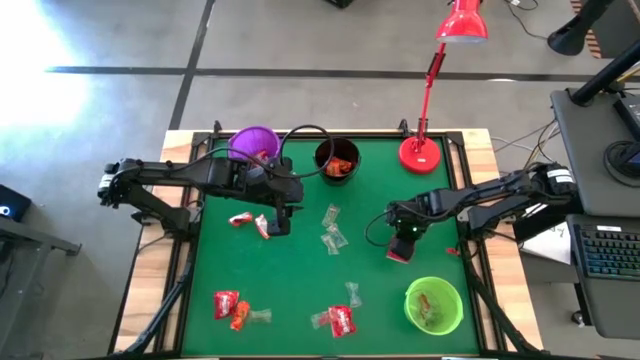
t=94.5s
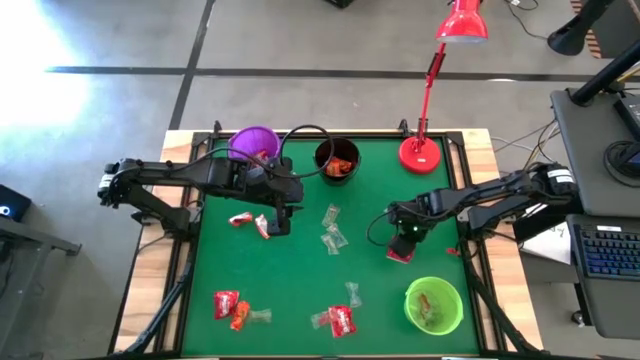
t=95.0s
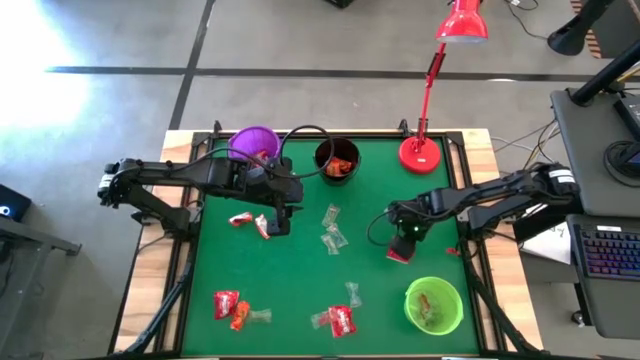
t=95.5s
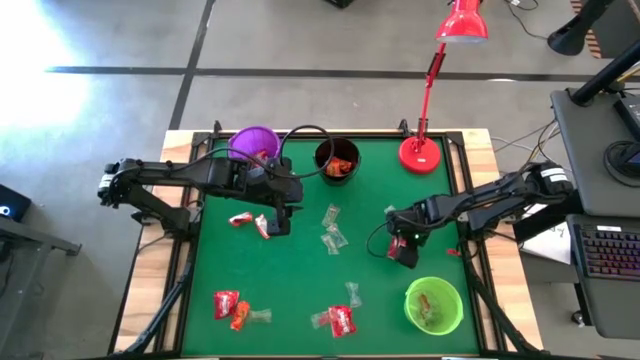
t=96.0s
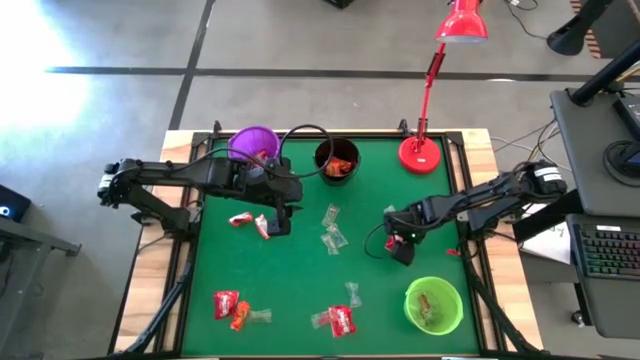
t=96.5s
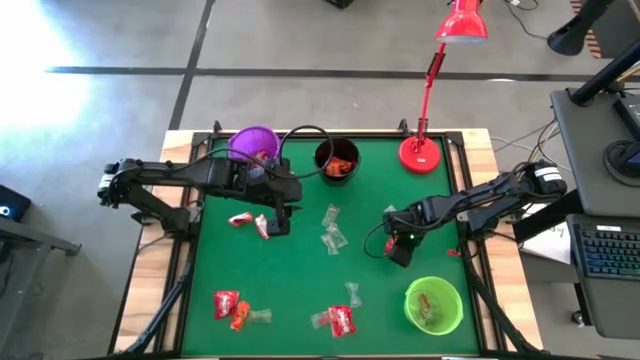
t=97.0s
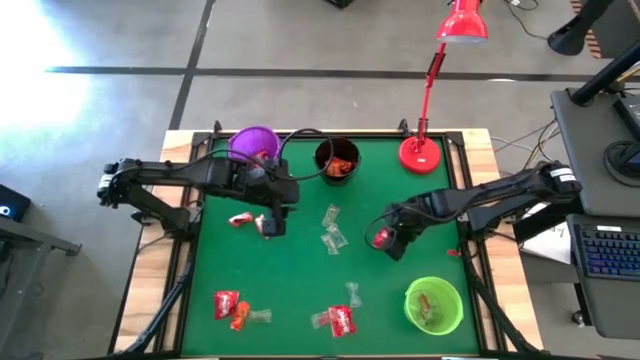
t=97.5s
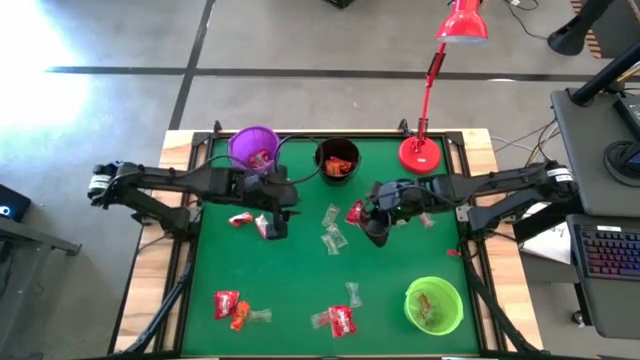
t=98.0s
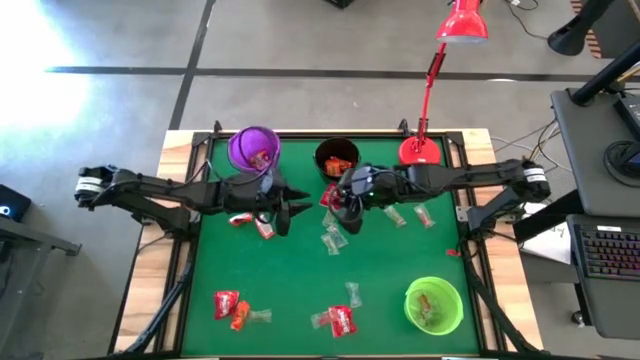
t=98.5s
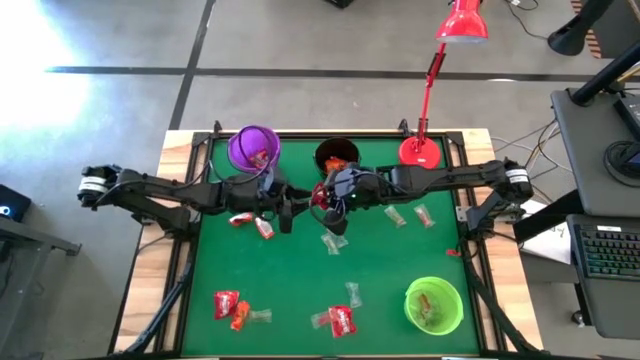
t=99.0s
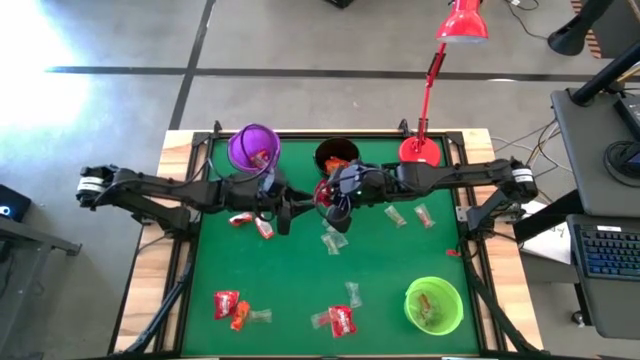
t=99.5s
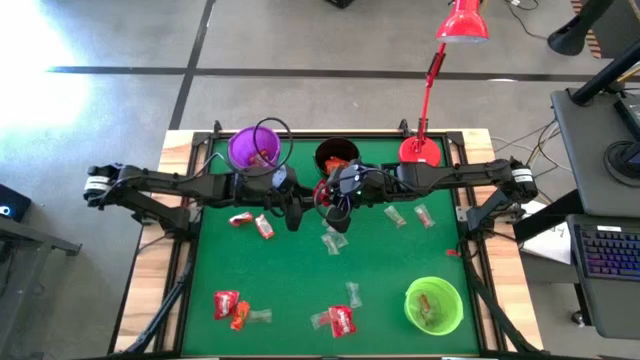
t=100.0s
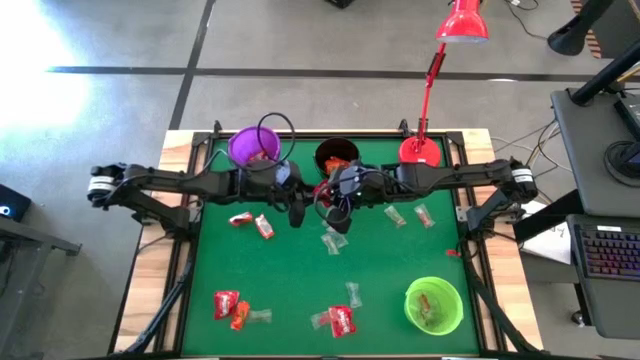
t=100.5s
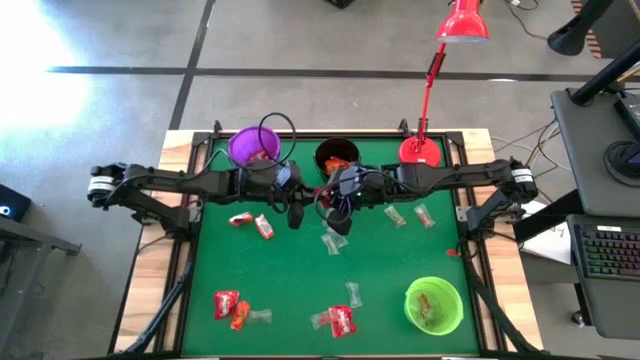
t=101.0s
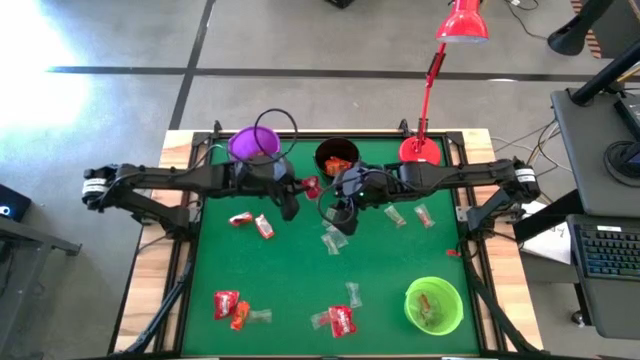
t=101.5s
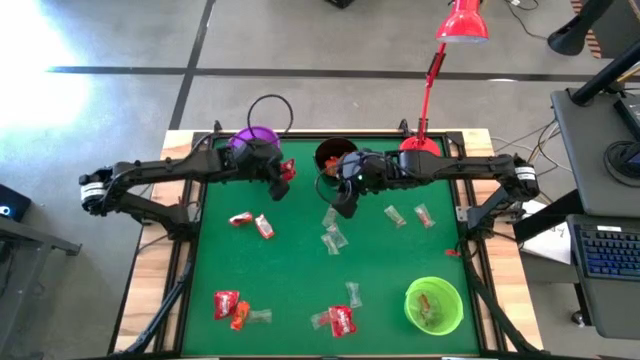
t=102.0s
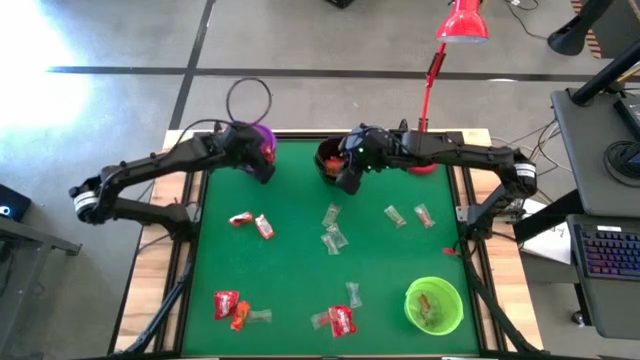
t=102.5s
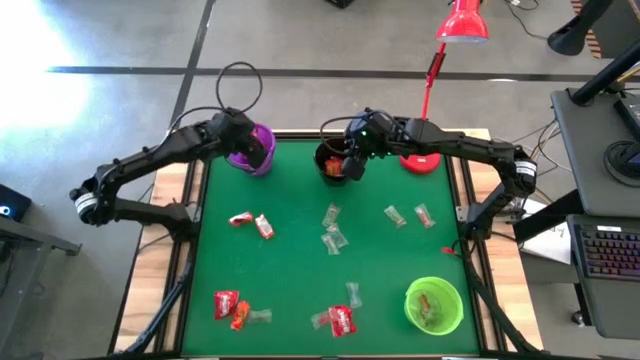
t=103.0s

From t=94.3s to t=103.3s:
Task: Sort candy
Put the red candy into the purple bucket

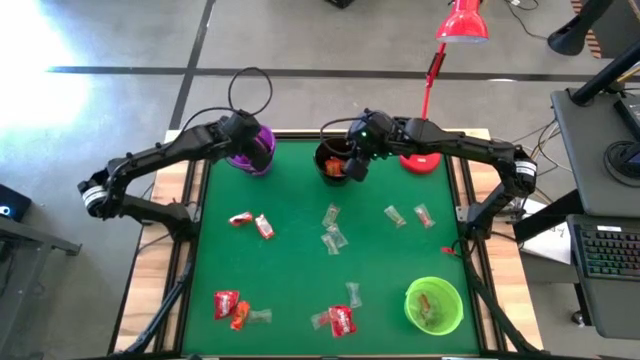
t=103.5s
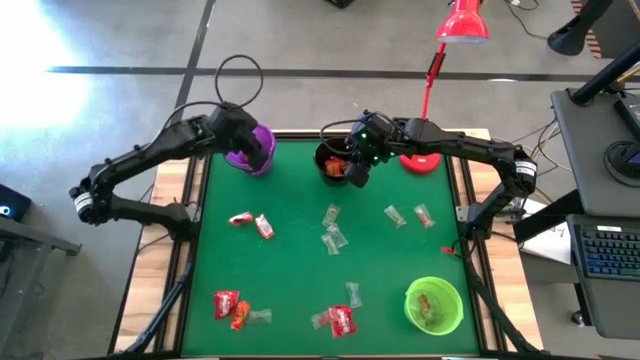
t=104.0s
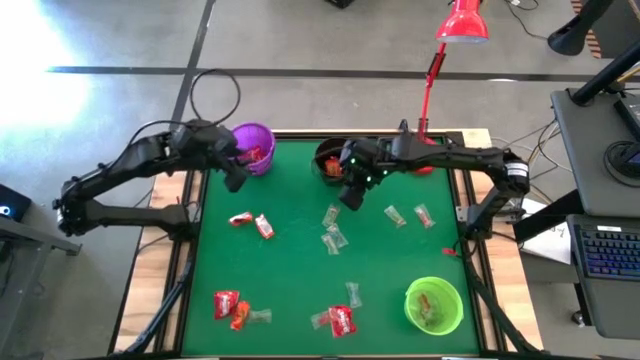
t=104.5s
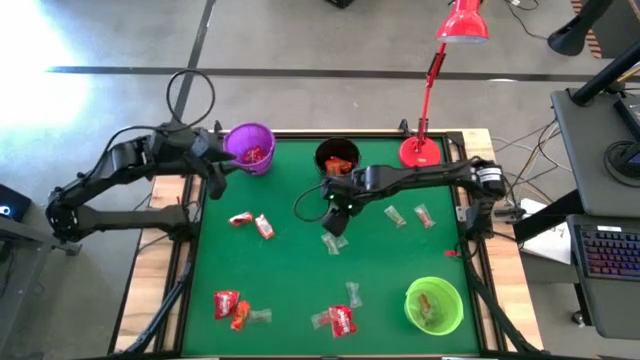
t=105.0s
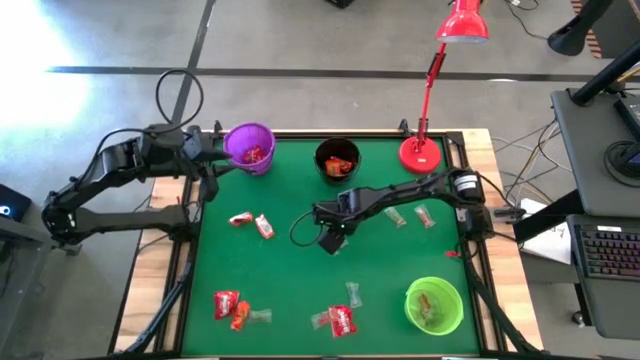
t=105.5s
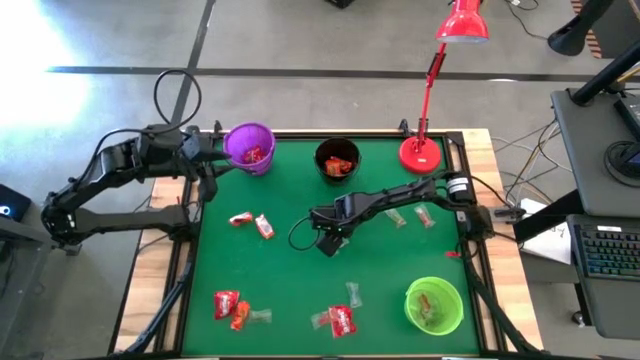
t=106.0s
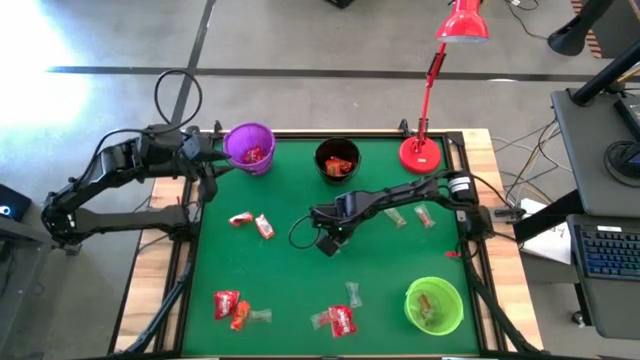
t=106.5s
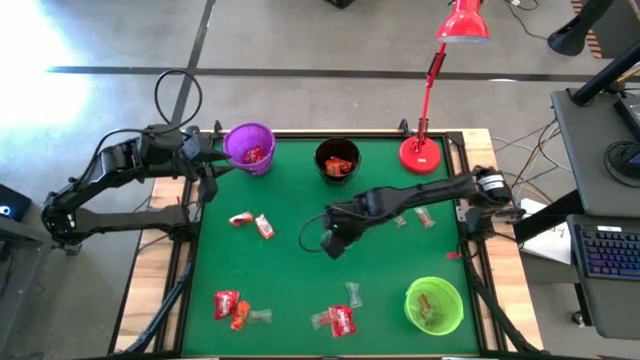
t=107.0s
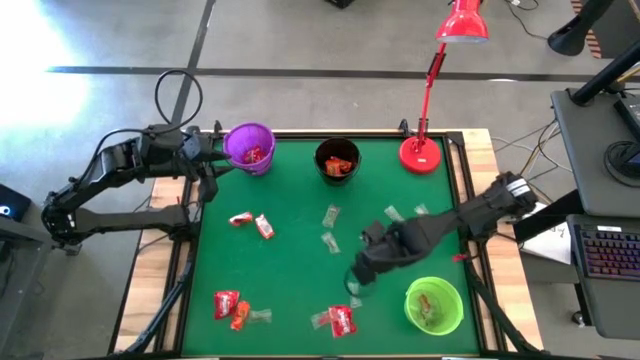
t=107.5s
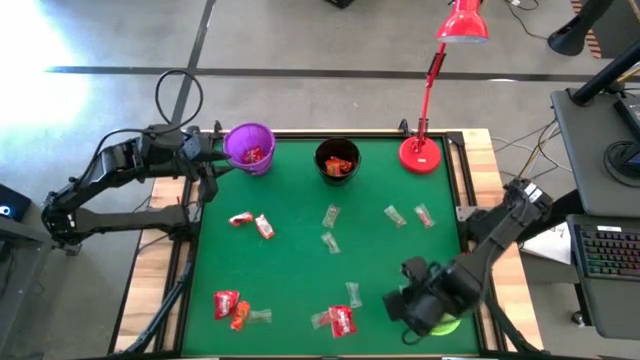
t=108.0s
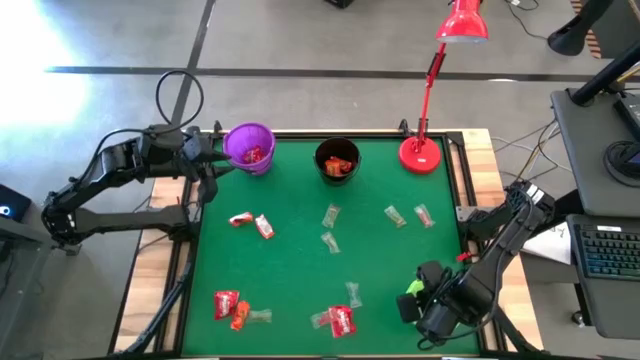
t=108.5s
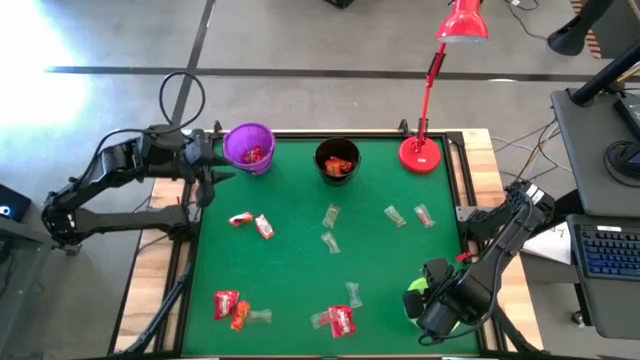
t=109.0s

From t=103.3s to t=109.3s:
Put the blue gummy into the green bucket

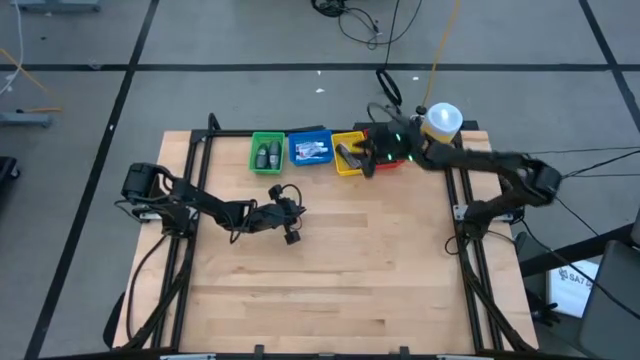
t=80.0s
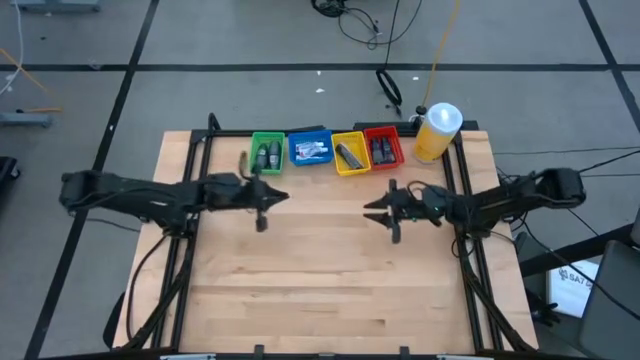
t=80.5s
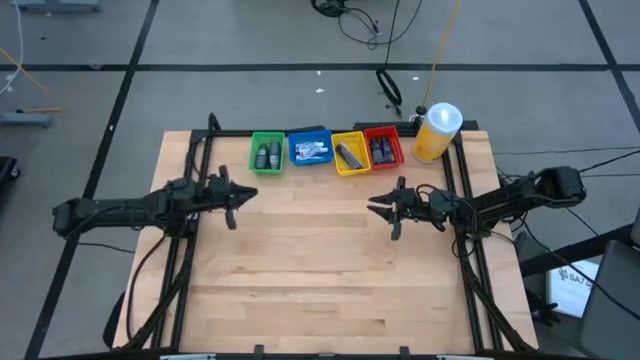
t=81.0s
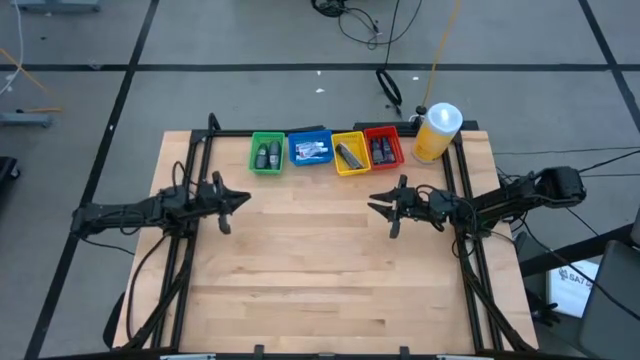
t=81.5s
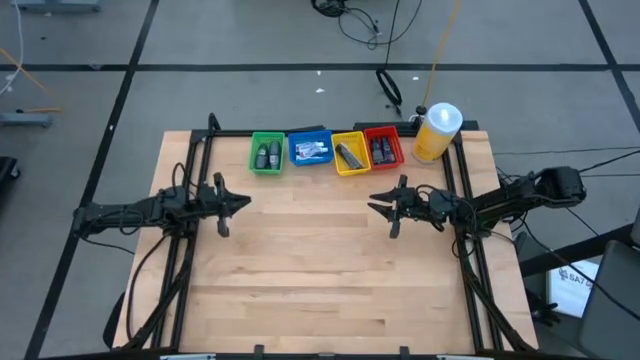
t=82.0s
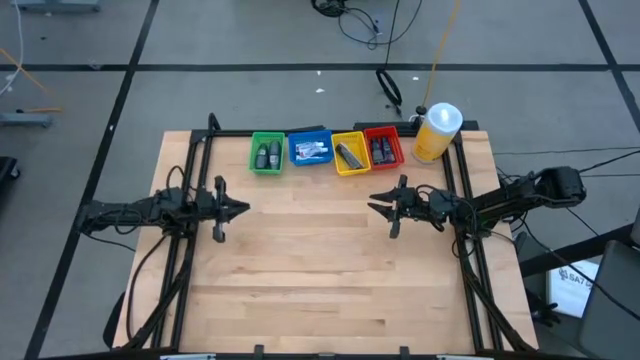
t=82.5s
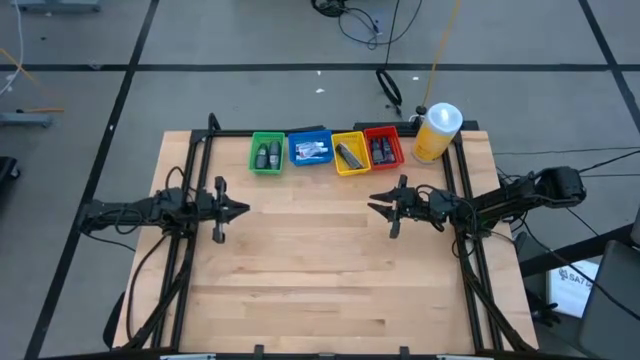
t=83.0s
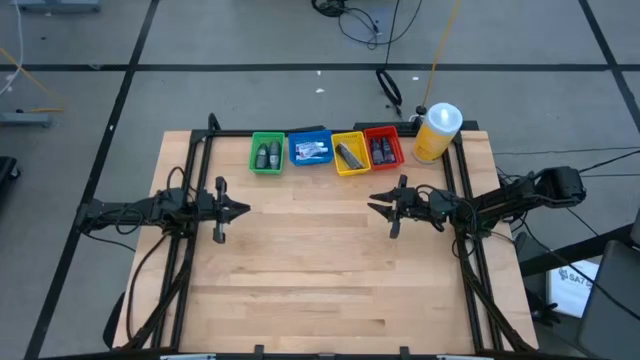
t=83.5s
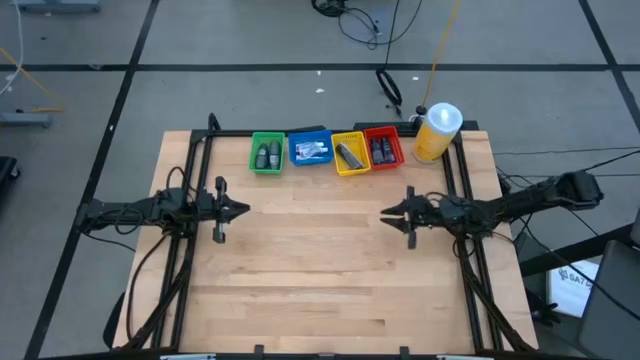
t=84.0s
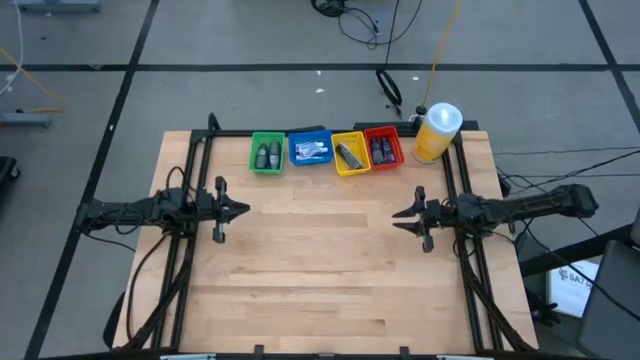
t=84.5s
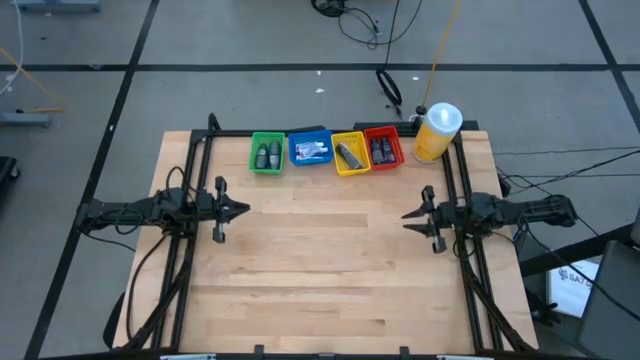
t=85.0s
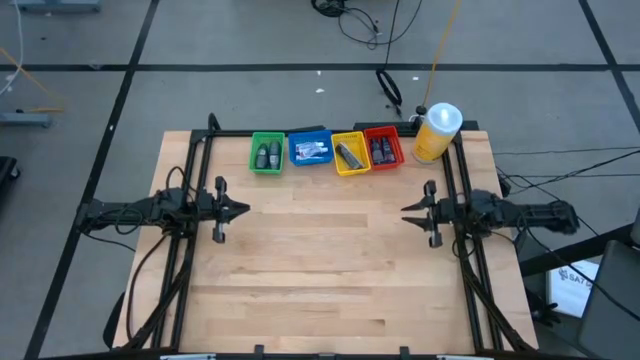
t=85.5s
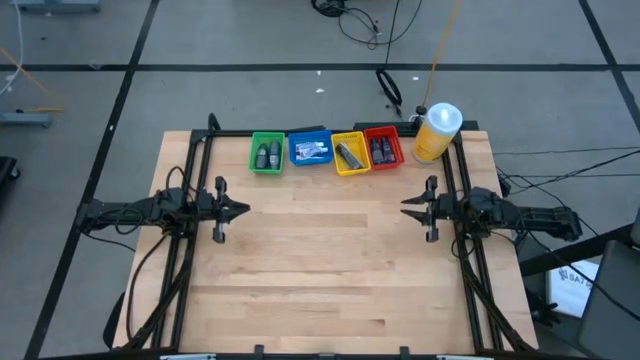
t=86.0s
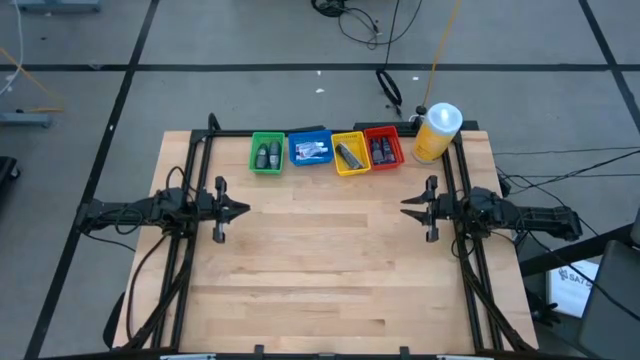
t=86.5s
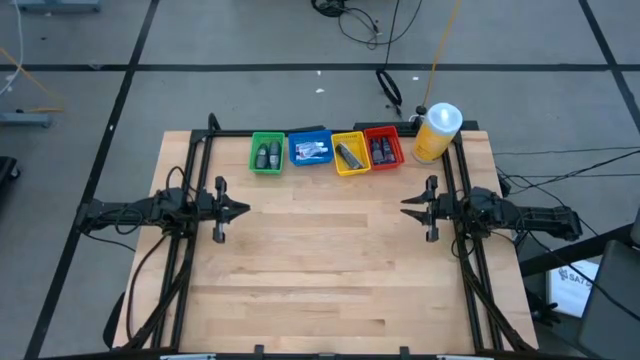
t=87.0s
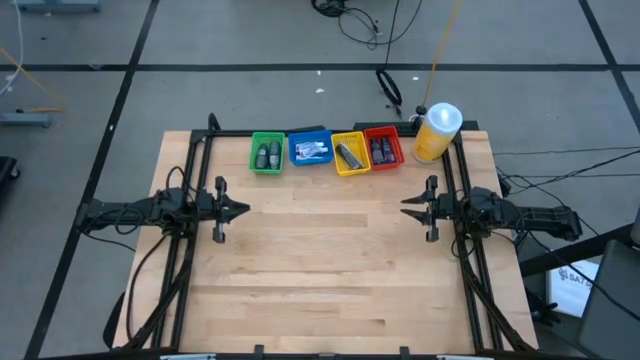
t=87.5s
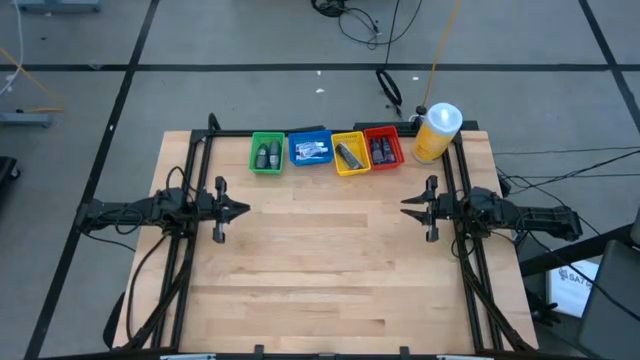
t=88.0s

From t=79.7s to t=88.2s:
Task: Pick & Place Travel size toiletries
Return to Home Position
